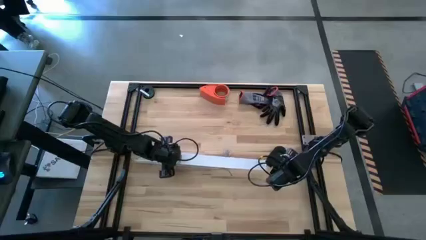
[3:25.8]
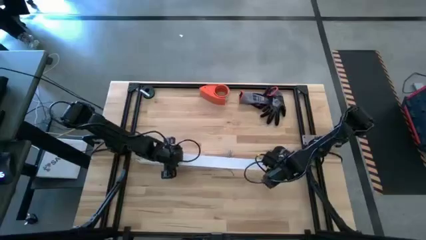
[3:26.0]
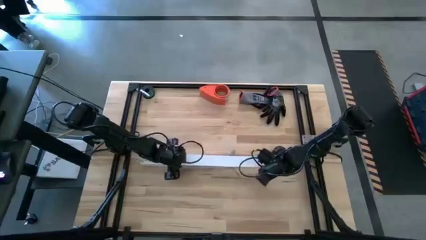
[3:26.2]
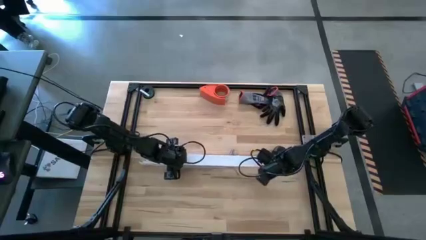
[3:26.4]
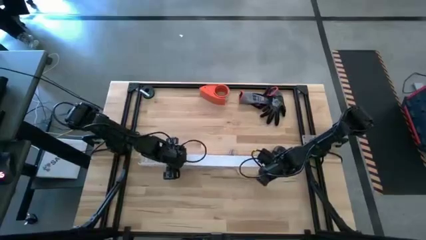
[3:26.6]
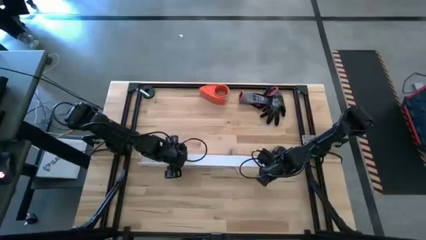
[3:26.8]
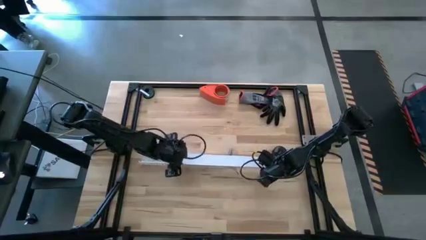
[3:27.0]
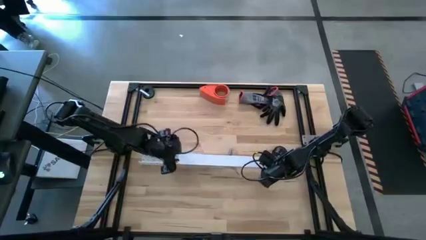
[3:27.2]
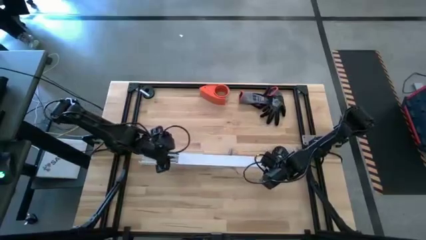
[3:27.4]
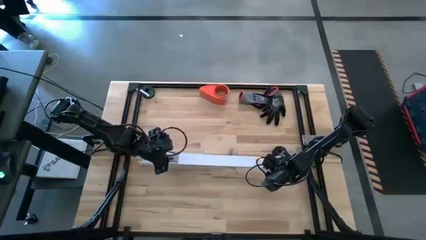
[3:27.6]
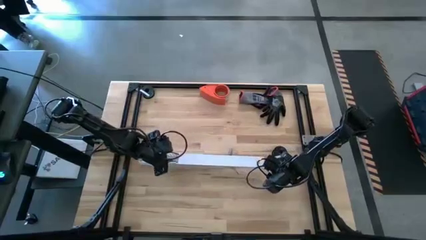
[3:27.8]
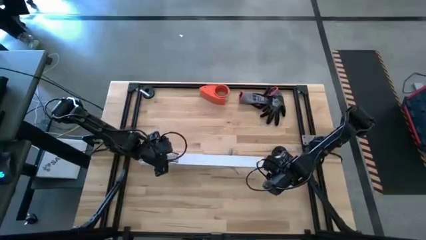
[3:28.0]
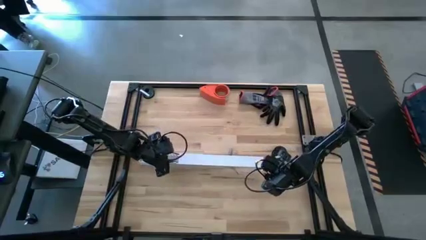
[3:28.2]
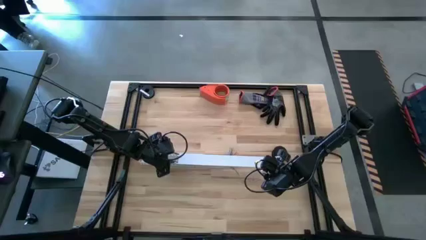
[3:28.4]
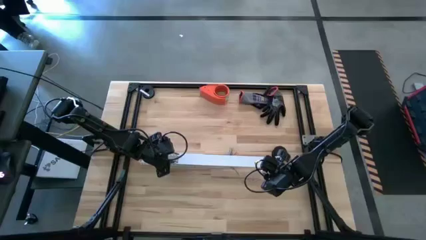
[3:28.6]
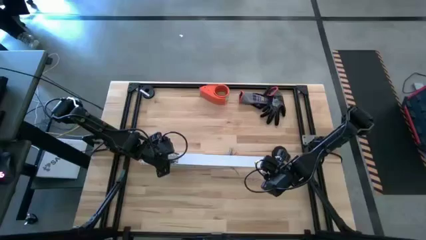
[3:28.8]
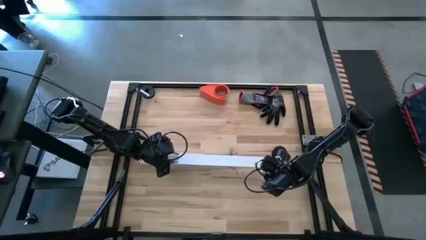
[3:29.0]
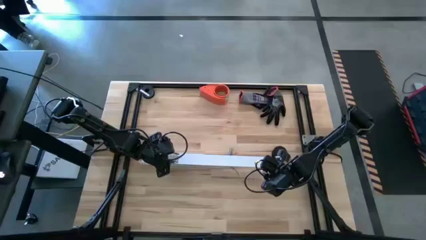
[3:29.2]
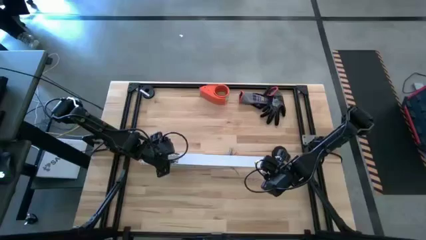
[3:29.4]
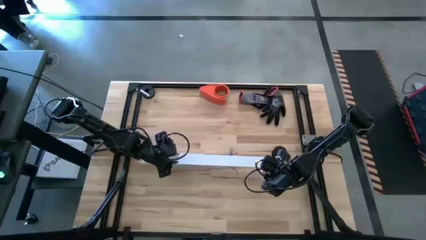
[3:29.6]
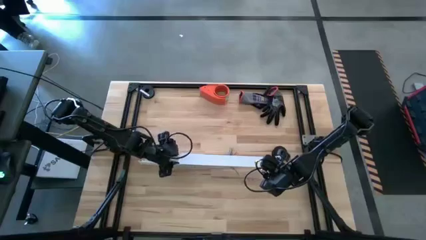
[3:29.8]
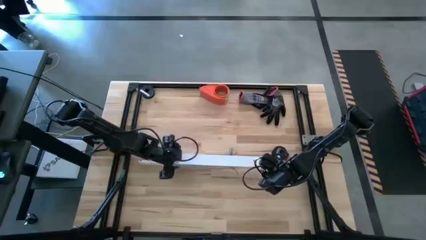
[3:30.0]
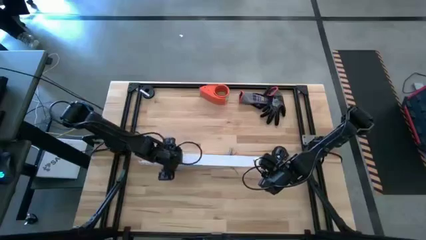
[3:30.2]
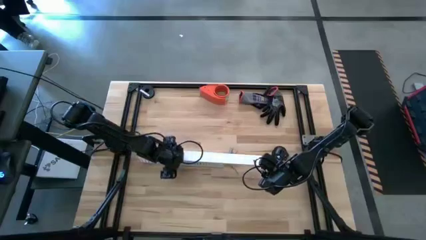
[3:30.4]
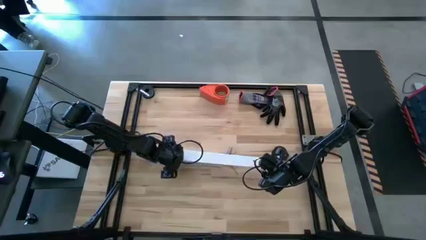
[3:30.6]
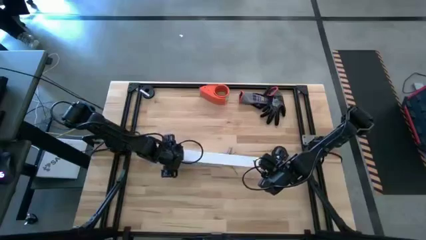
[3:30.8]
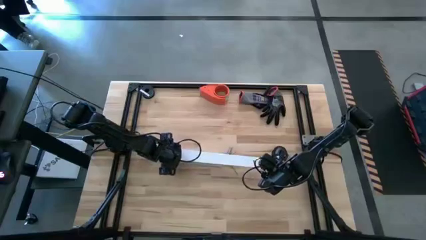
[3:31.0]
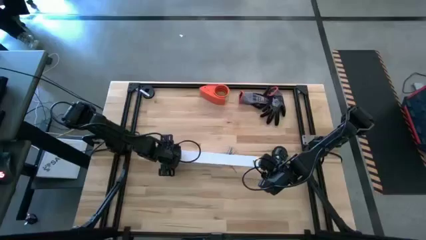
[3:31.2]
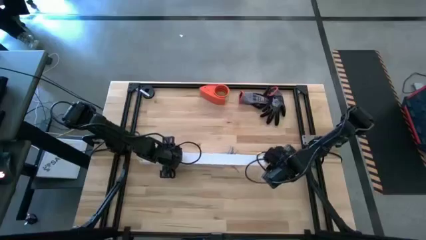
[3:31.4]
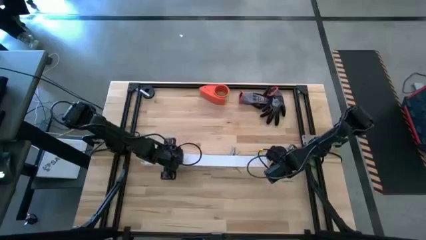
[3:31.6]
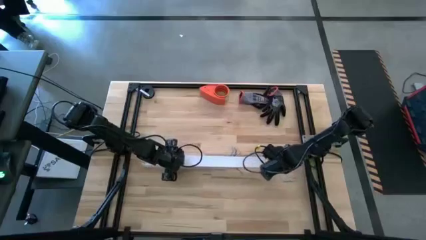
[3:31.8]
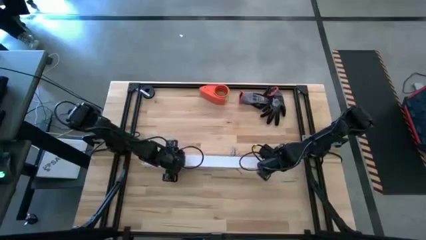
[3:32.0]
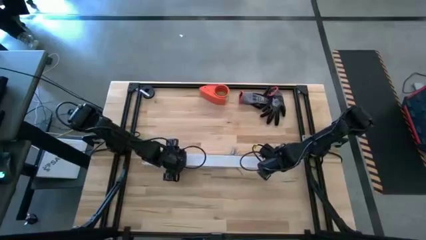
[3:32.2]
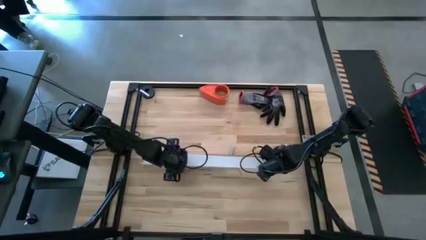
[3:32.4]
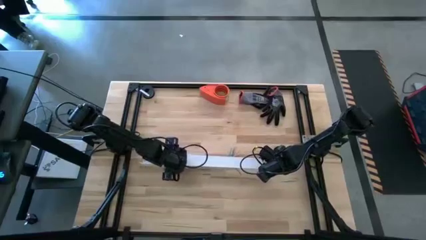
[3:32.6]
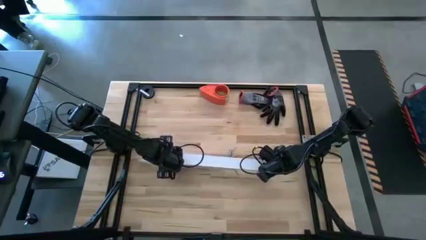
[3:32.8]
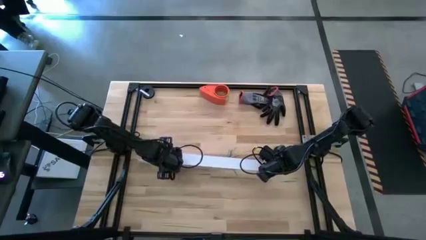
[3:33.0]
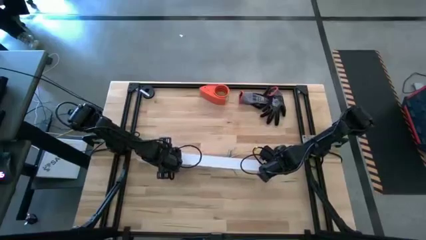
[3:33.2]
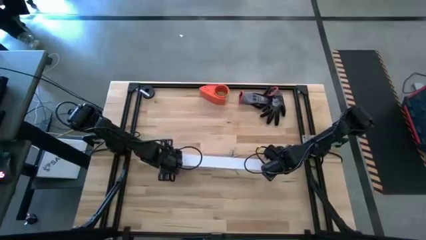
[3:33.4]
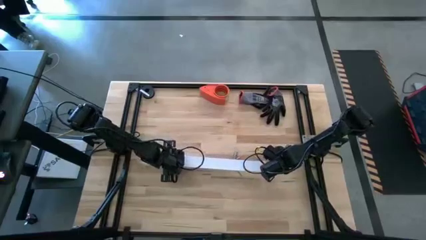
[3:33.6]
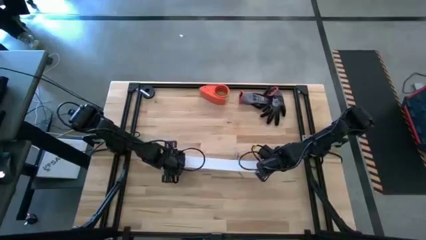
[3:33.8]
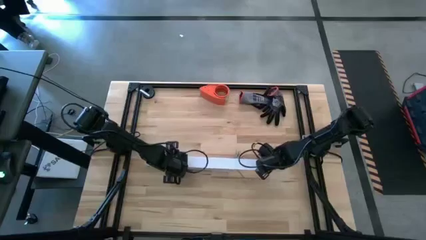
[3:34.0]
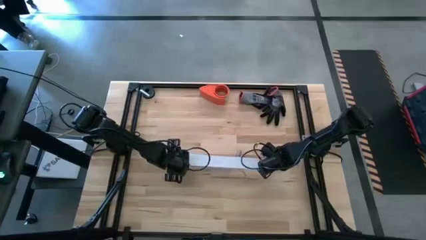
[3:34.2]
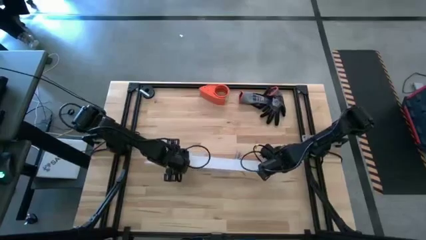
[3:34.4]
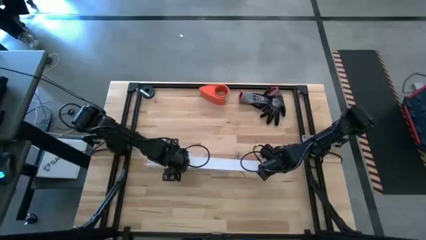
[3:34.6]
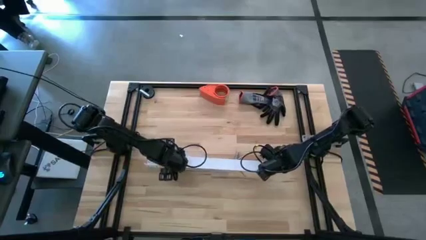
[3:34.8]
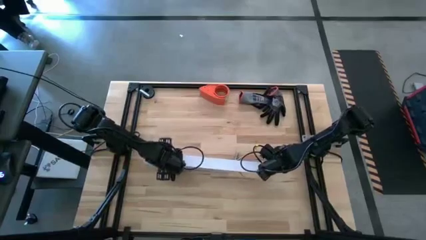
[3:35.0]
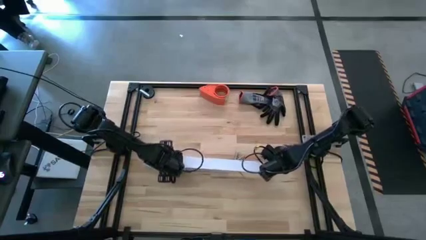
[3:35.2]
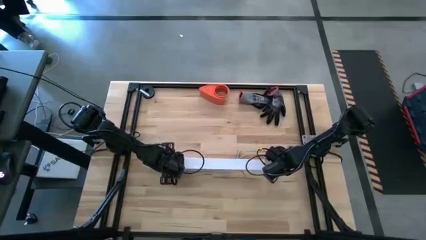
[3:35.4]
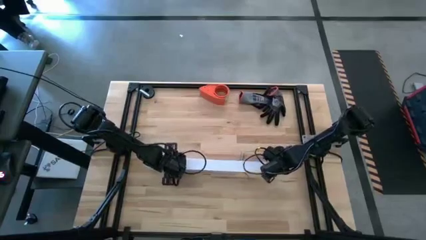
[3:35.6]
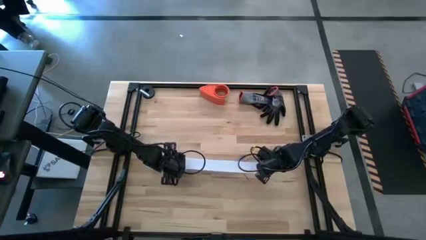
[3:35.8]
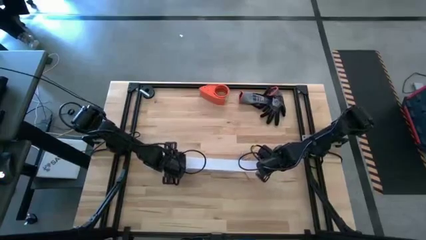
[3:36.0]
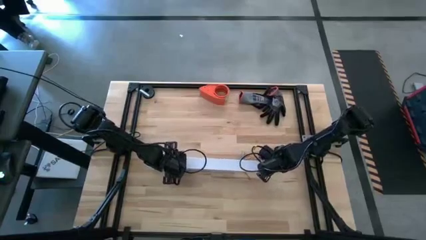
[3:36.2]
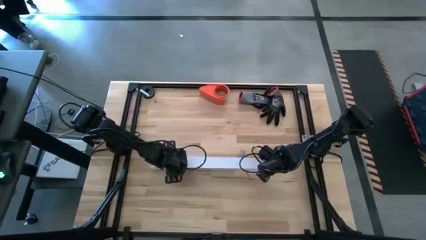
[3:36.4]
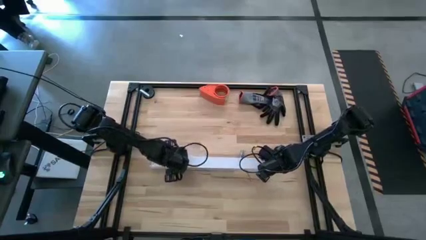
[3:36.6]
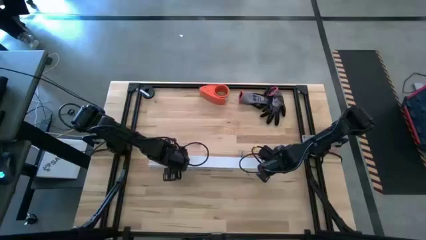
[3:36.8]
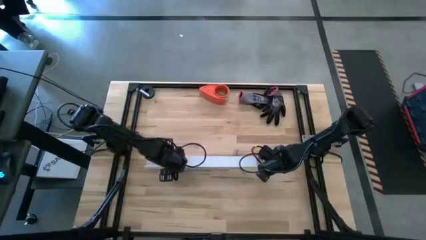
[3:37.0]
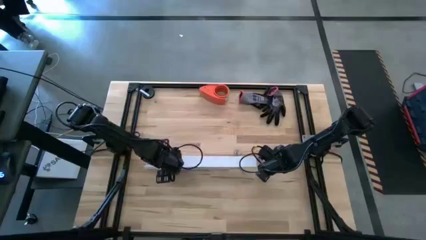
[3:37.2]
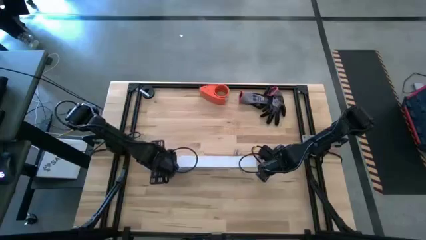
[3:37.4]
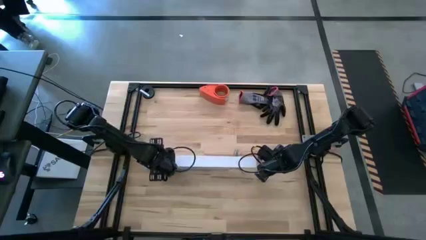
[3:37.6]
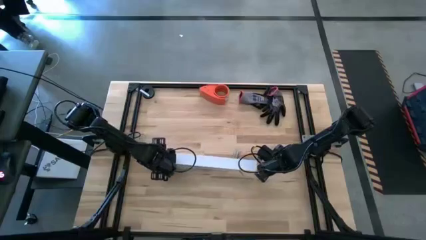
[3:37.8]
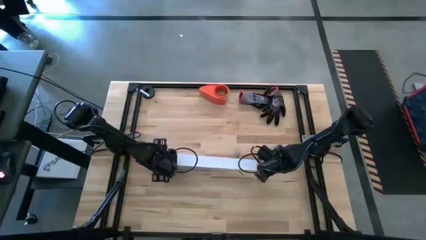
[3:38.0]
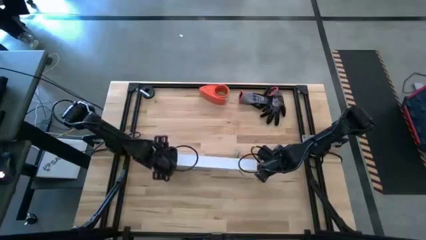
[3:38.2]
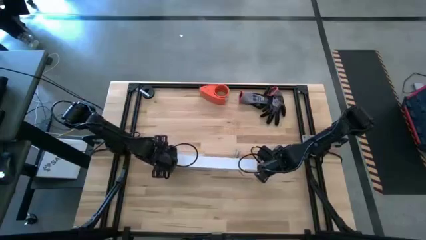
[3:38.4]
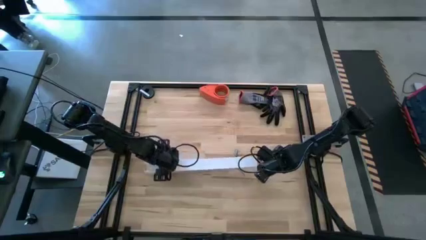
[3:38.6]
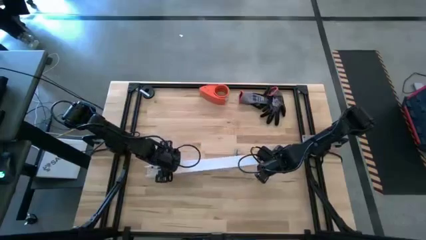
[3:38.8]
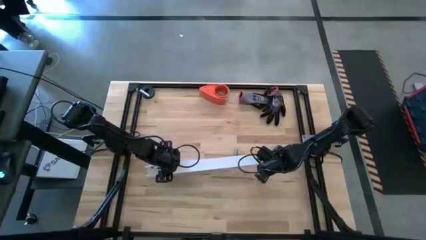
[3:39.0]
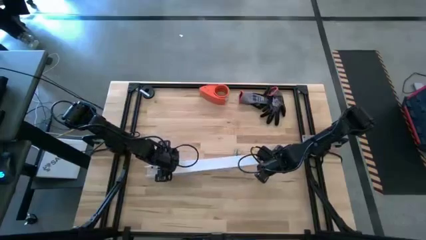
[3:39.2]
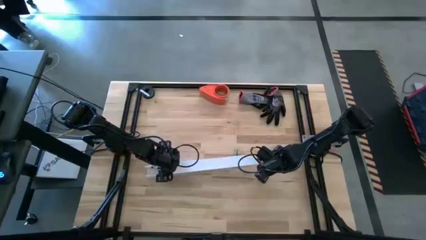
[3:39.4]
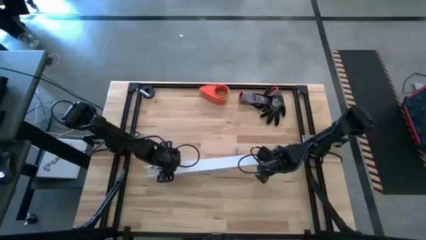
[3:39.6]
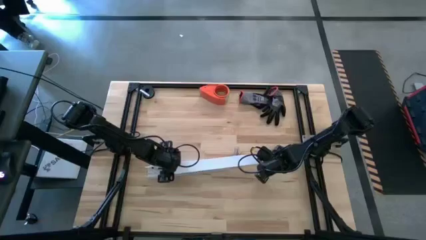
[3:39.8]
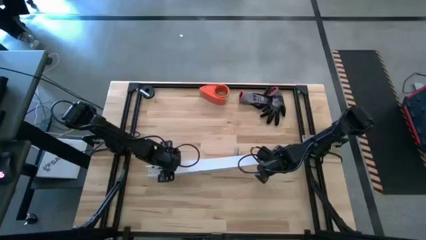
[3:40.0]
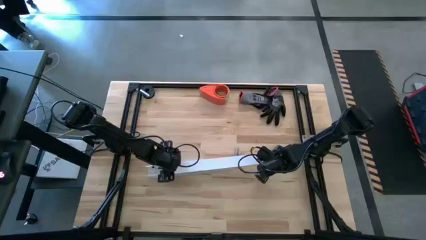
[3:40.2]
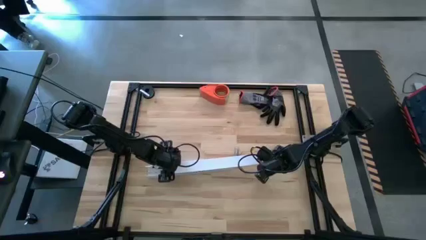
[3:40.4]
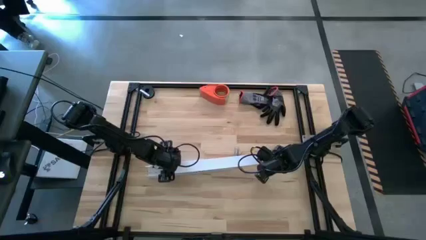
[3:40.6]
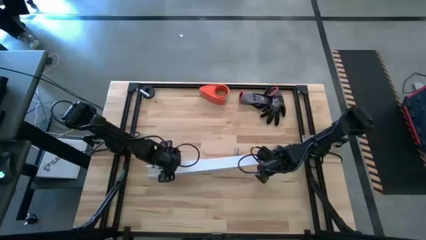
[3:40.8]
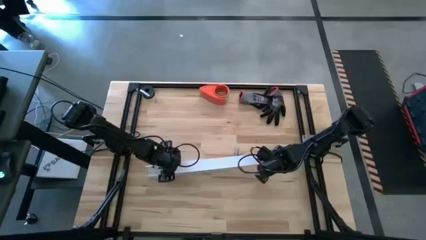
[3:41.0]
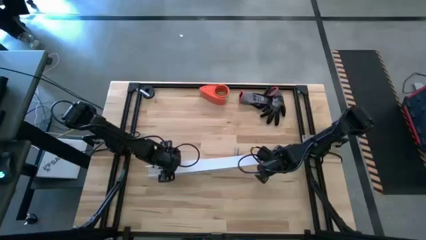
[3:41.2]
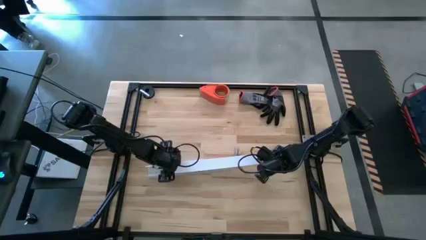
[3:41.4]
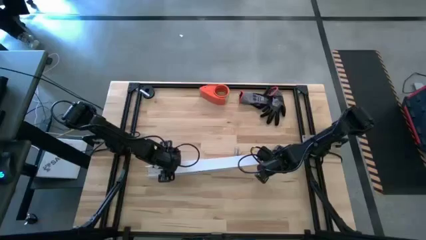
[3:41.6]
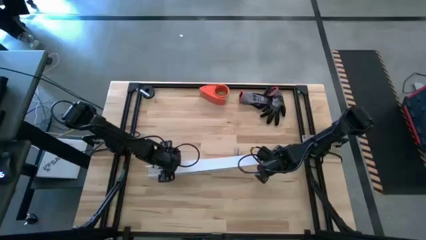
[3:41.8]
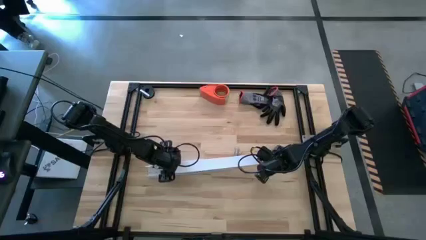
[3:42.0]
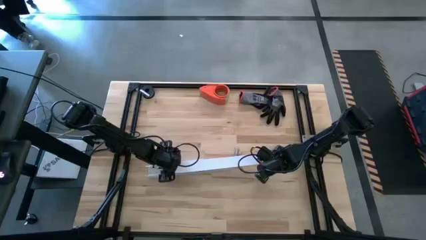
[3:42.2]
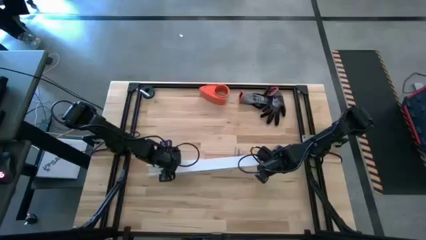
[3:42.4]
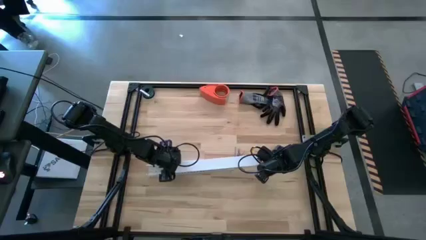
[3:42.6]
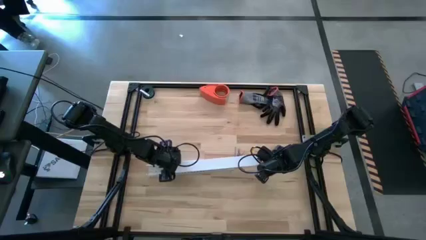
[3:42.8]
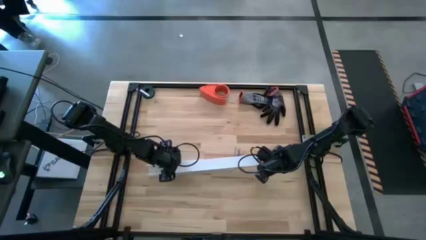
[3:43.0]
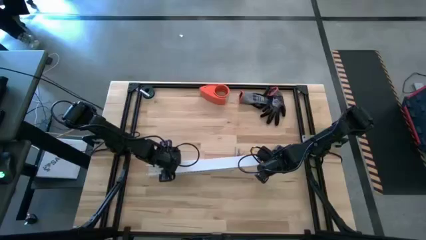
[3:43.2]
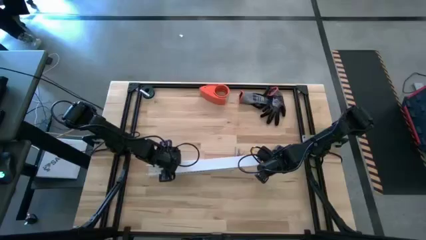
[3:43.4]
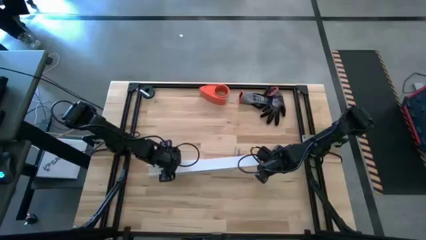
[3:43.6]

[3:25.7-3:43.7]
Task: Ziptie cables
Close the white cable duct
